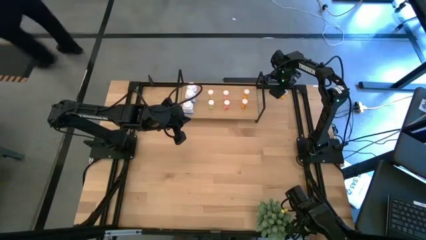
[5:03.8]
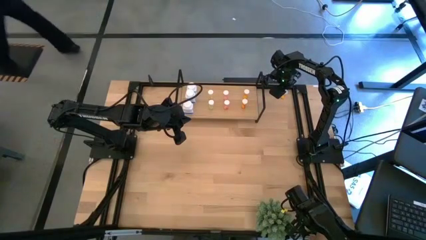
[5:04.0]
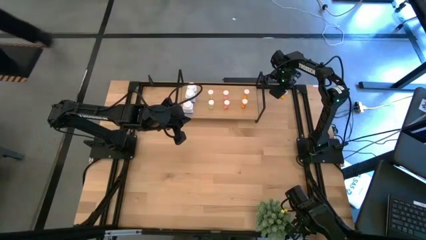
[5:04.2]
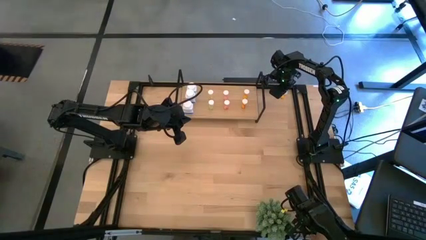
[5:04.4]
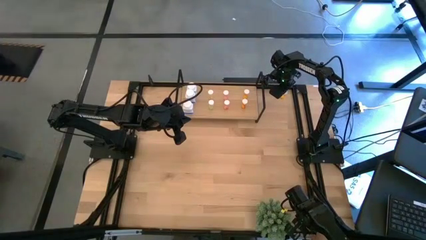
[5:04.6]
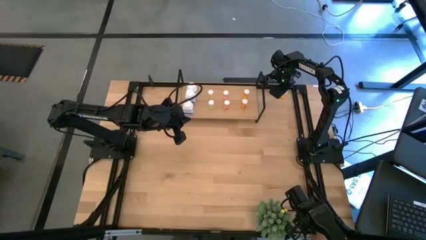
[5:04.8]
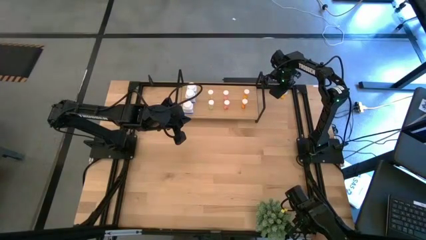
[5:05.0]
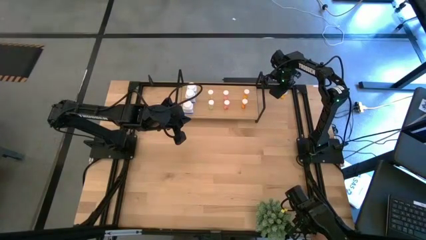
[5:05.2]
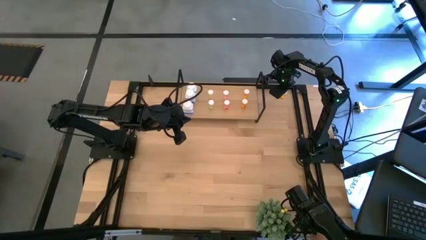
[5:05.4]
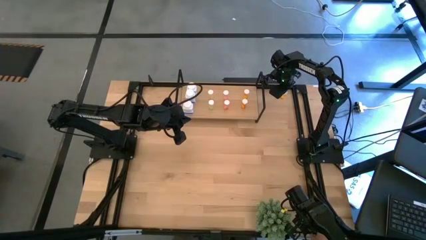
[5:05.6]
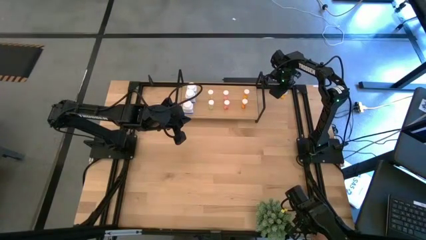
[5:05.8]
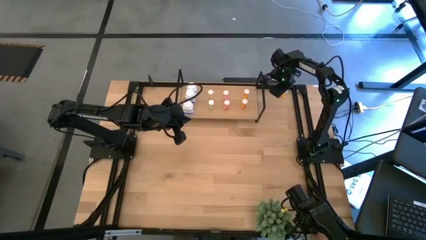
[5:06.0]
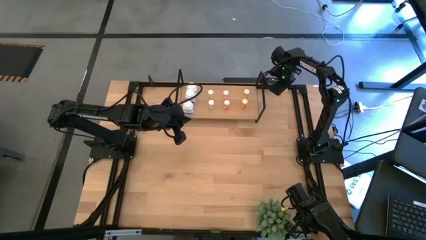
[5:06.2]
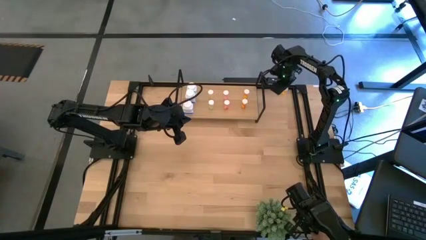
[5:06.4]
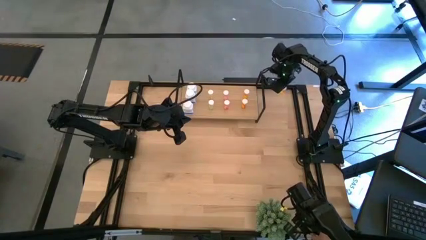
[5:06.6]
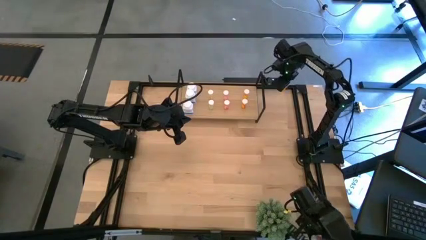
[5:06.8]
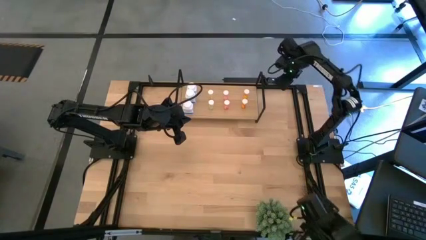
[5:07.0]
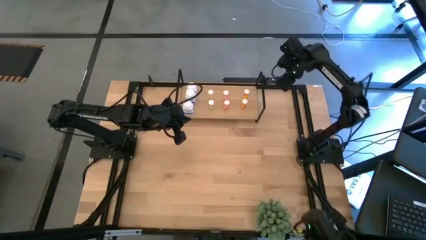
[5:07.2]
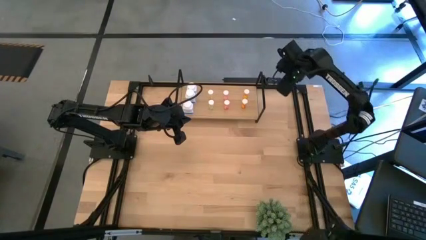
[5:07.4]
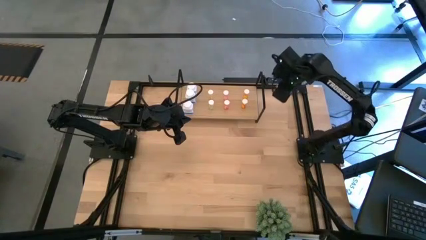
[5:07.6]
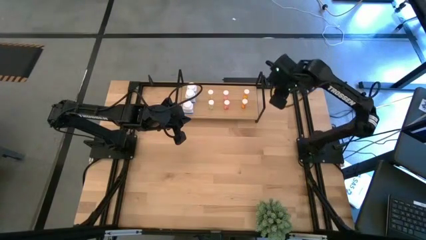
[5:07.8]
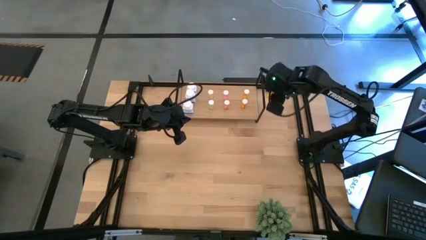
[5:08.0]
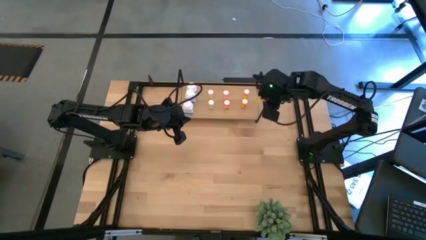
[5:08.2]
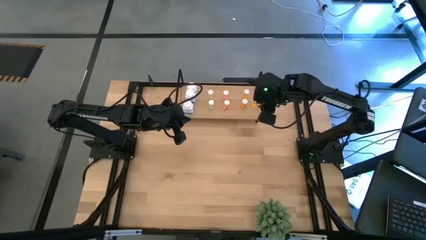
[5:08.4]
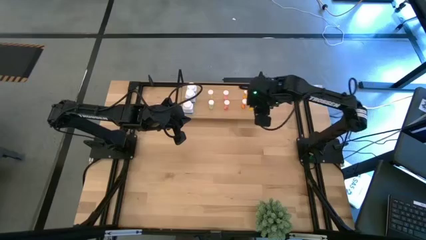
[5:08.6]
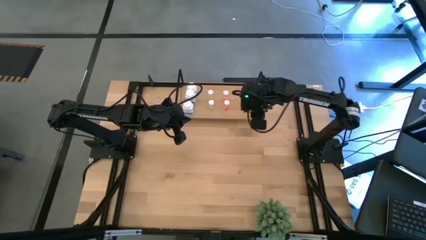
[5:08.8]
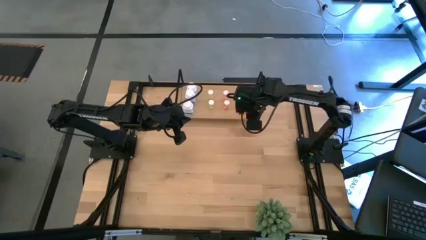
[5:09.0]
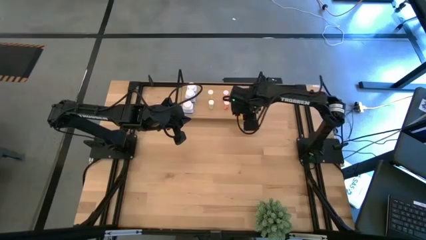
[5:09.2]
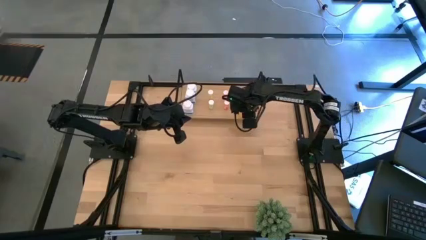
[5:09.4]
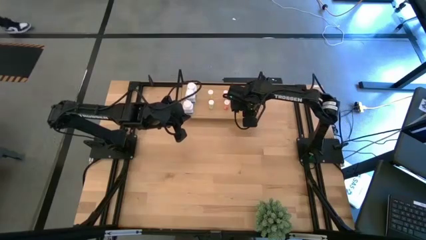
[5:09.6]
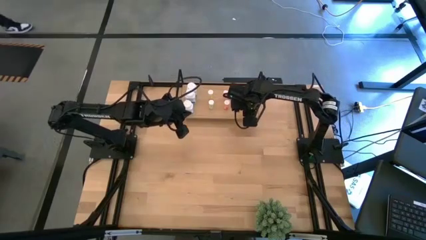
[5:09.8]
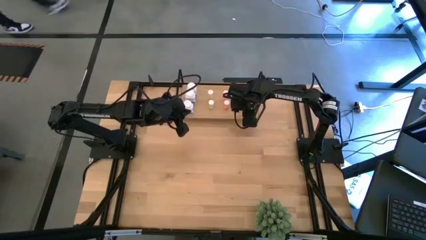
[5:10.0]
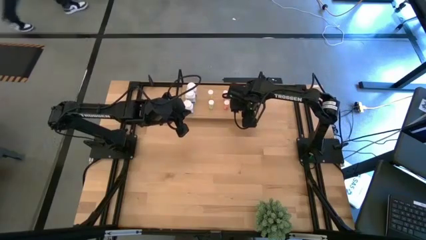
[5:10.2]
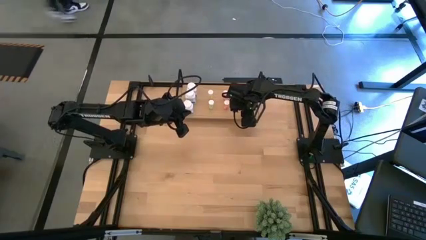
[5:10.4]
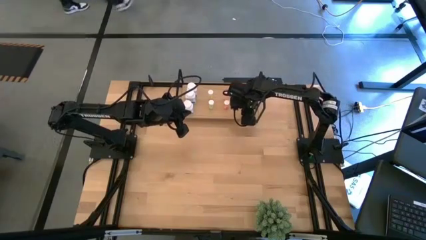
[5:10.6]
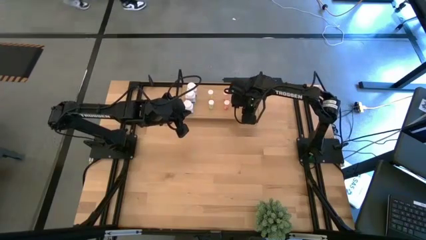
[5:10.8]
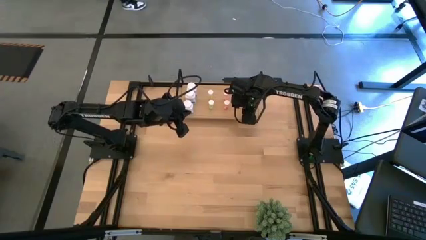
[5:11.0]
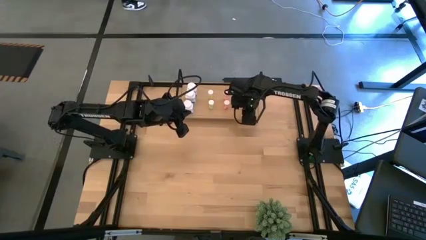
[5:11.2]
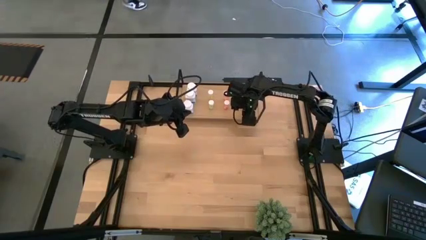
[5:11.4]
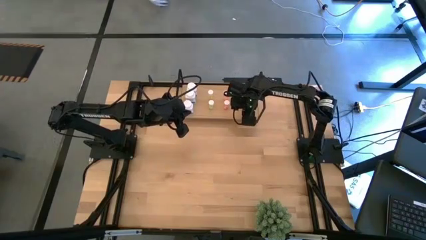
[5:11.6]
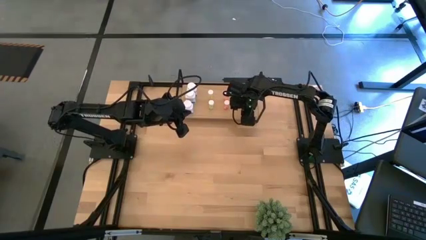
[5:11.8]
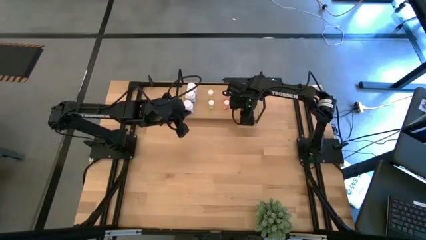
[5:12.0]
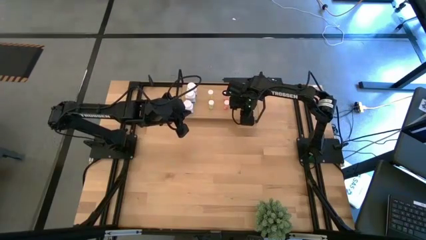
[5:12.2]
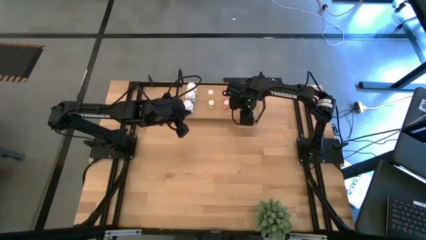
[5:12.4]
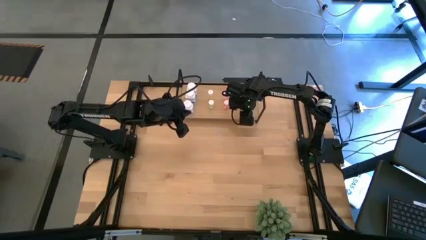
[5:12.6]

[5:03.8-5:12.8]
Task: Pick and place medicine bottles onto shelf by color
Put the orange pill bottle on the shelf aligned with the other orange pill bottles

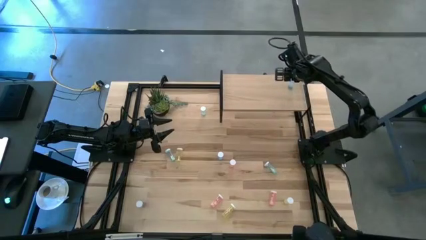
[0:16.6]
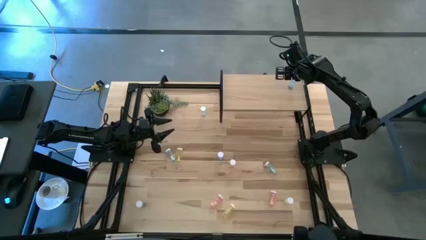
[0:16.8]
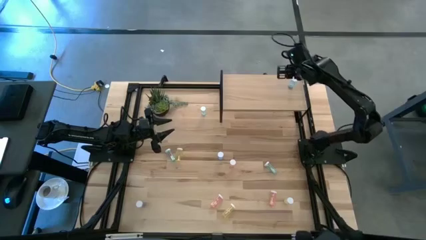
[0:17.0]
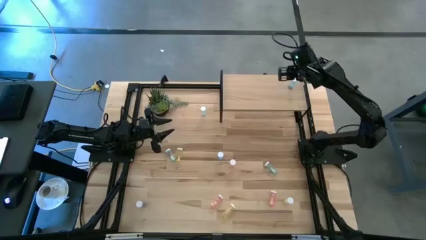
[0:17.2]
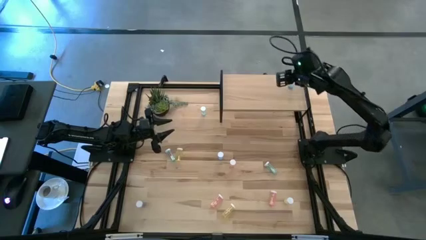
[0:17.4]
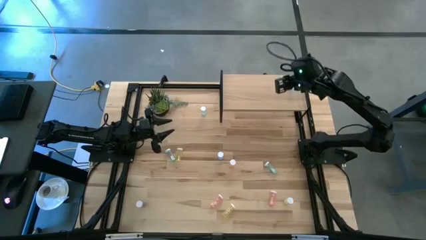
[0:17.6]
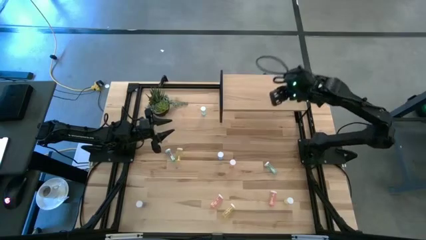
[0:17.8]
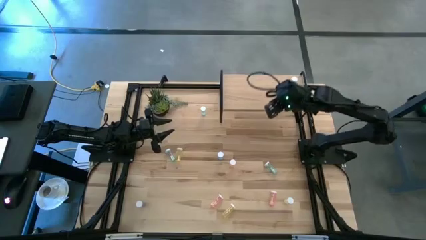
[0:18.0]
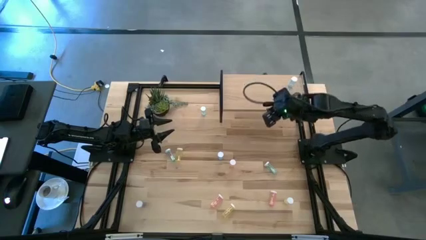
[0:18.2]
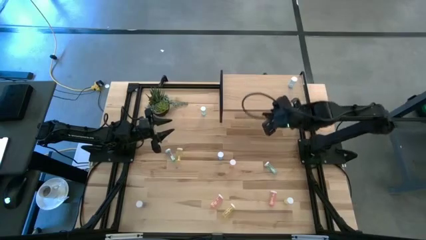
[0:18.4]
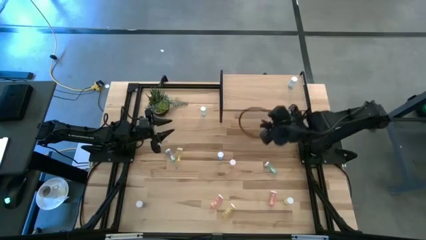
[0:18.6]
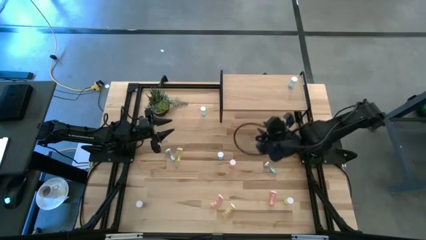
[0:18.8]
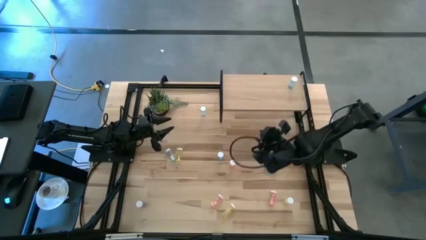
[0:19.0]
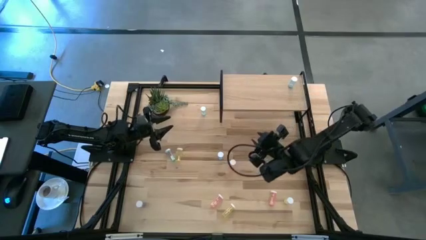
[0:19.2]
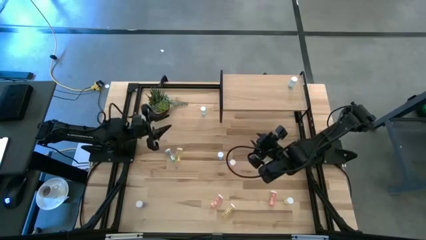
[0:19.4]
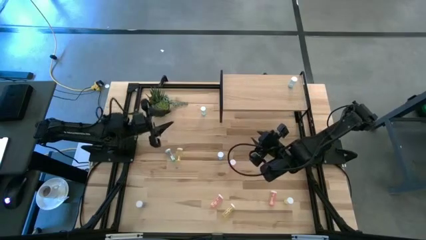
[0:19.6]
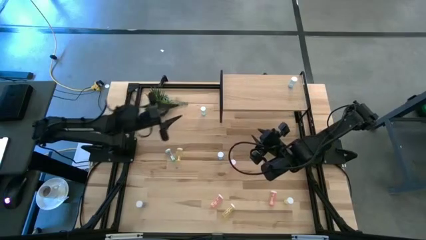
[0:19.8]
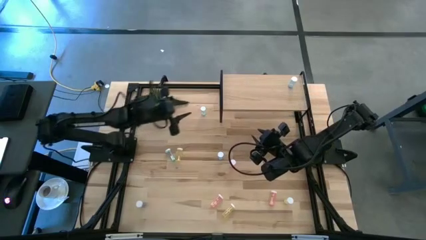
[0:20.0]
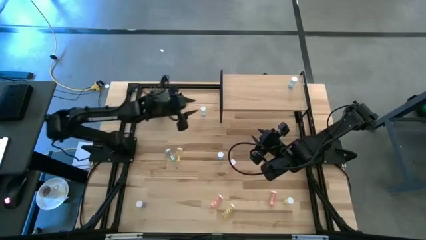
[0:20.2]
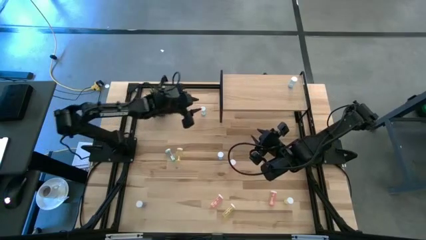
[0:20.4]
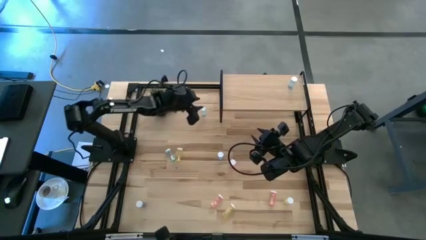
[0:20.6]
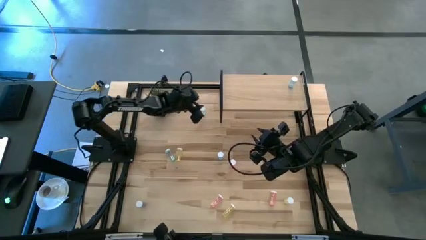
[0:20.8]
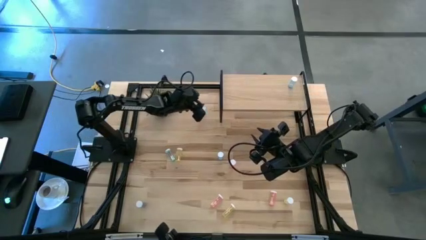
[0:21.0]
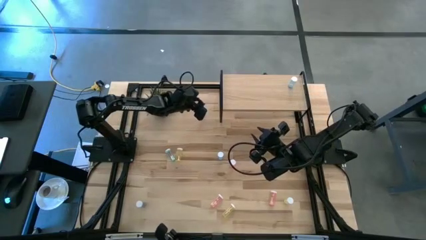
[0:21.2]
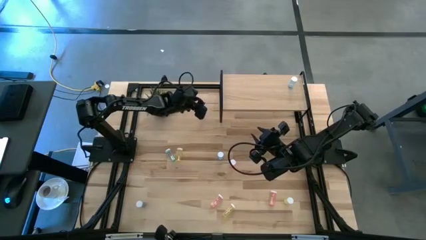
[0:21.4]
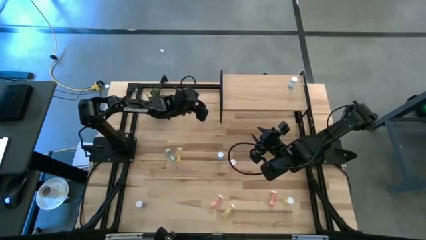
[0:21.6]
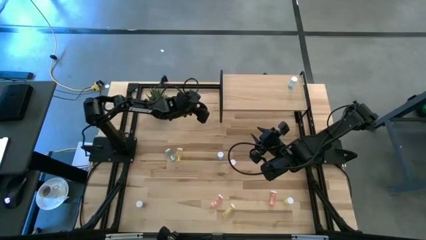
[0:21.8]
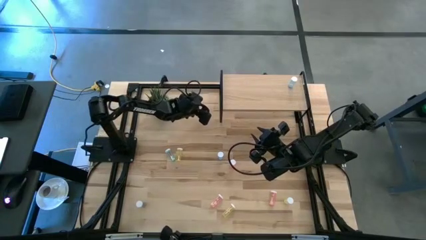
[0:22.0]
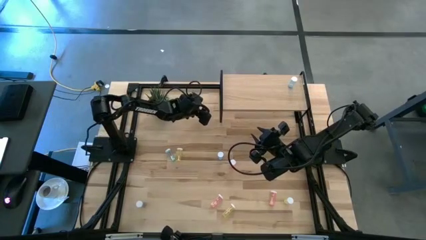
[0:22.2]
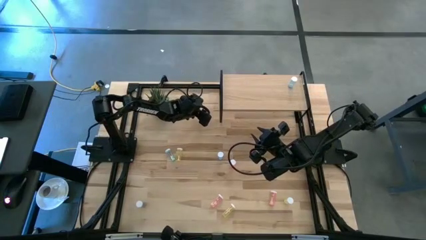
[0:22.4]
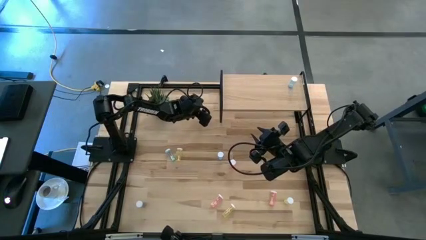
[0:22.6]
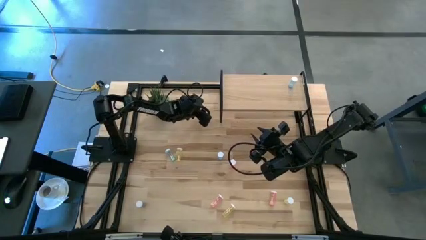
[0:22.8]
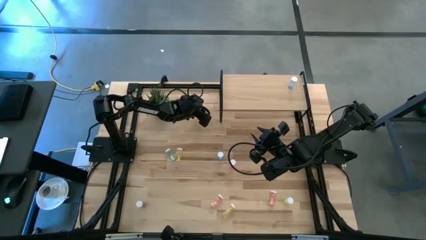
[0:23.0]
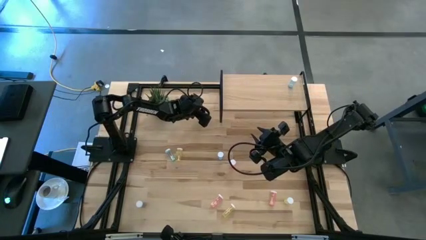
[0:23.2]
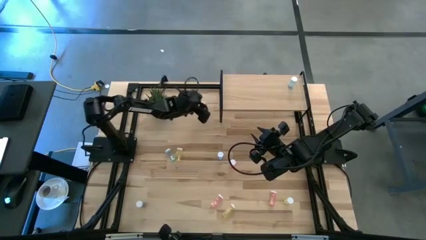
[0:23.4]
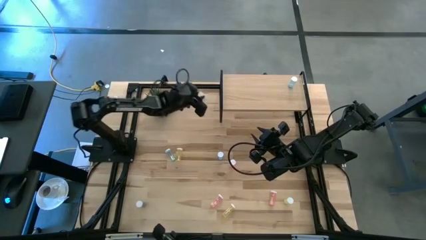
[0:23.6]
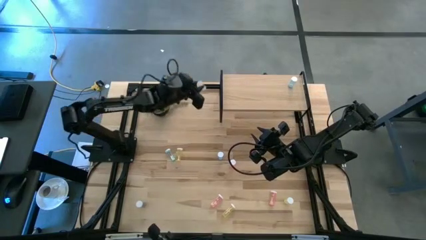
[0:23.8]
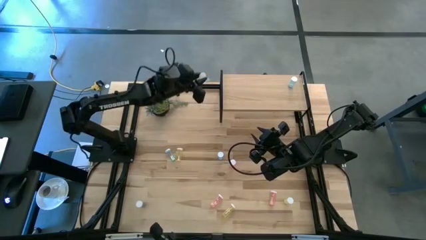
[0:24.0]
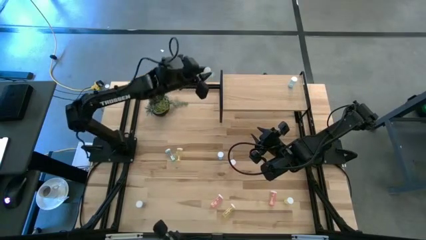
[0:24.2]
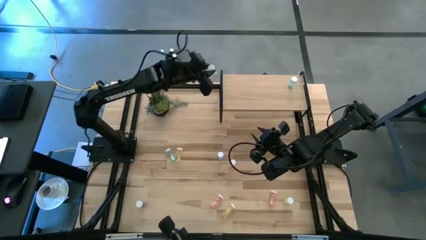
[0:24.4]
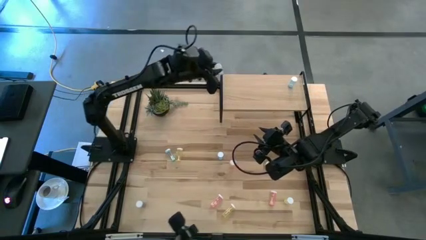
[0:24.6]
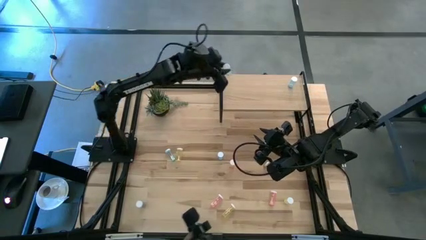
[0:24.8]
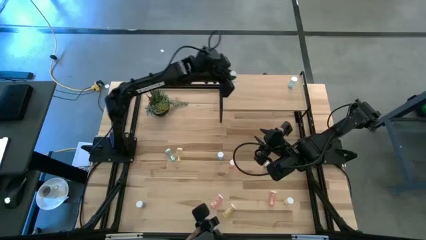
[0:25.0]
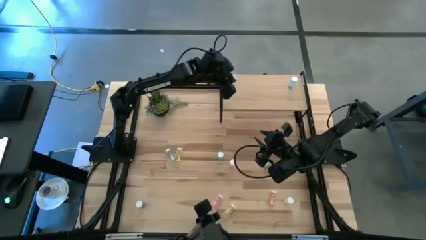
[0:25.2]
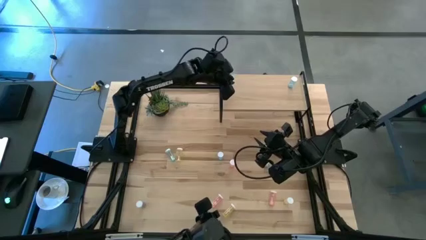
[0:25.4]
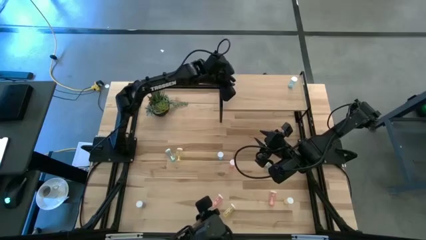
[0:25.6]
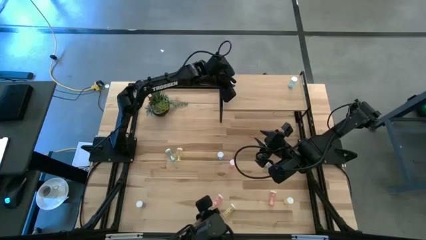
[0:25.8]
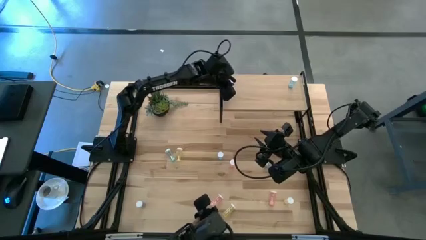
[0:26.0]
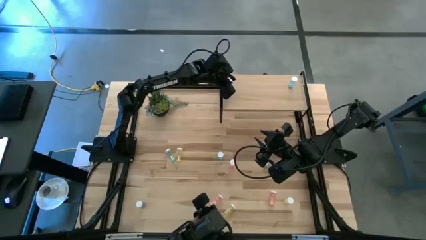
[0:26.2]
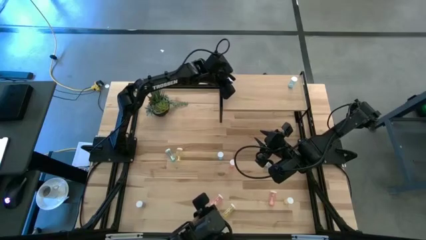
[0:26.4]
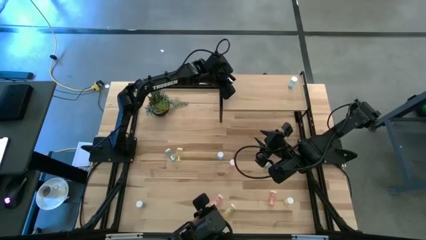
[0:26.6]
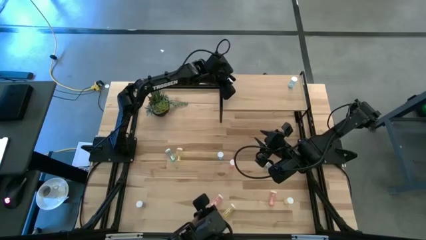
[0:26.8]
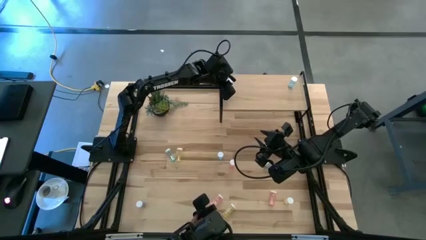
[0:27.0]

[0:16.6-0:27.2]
Task: Pick and place medicine bottles onto shelf by color
Put the light blue pill bottle on the shelf
